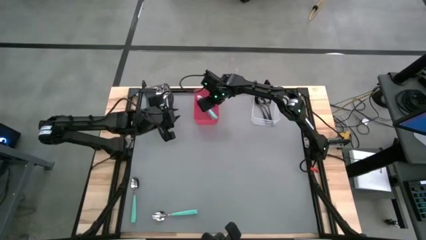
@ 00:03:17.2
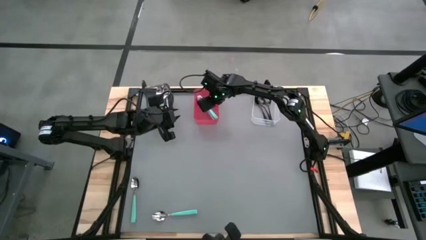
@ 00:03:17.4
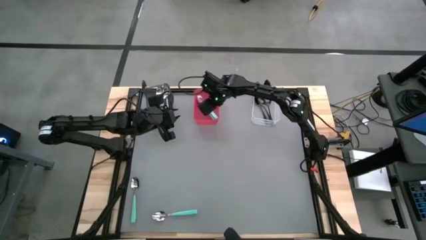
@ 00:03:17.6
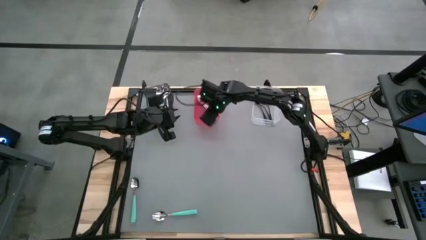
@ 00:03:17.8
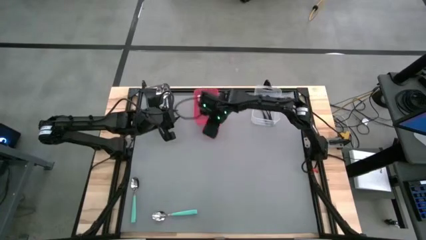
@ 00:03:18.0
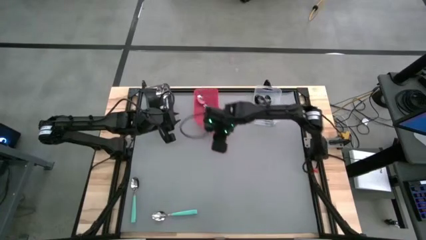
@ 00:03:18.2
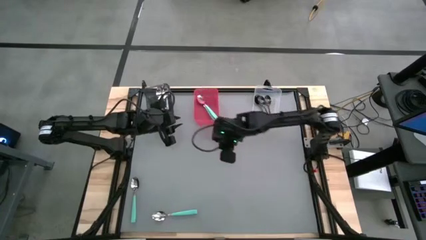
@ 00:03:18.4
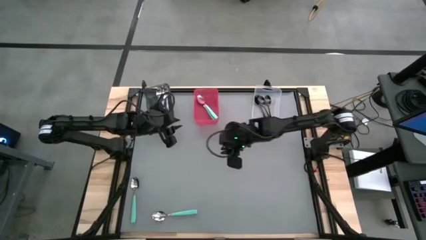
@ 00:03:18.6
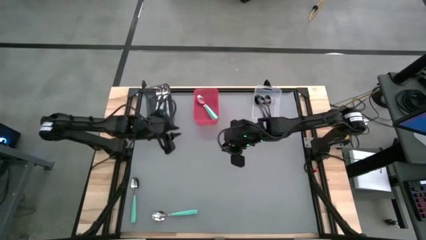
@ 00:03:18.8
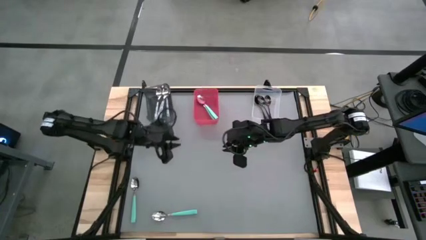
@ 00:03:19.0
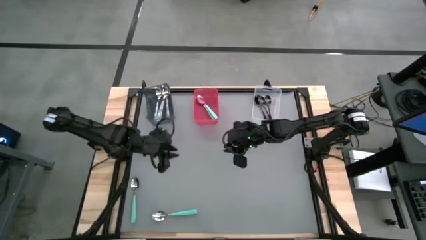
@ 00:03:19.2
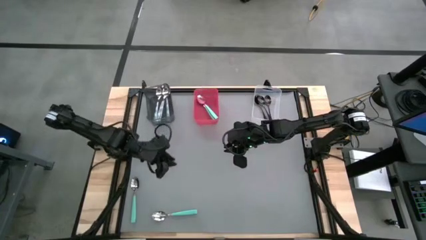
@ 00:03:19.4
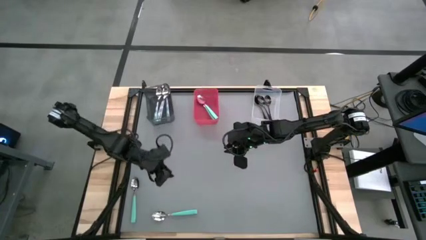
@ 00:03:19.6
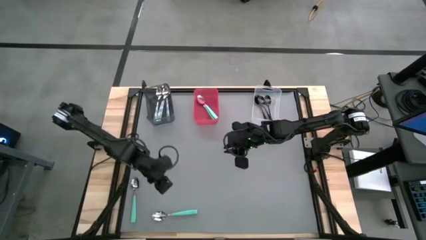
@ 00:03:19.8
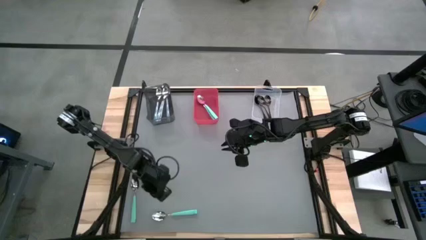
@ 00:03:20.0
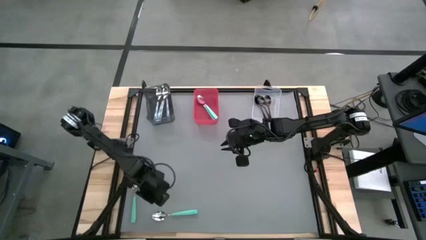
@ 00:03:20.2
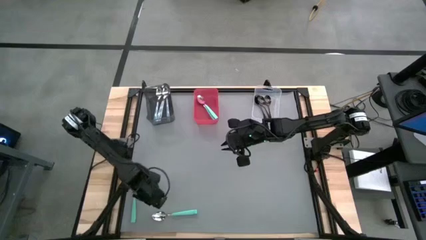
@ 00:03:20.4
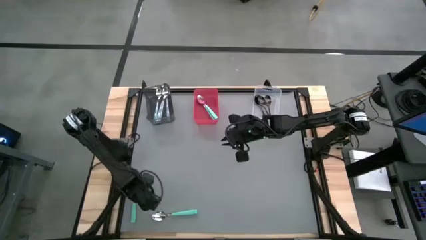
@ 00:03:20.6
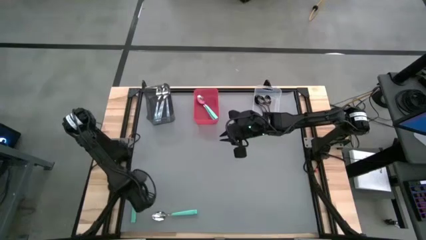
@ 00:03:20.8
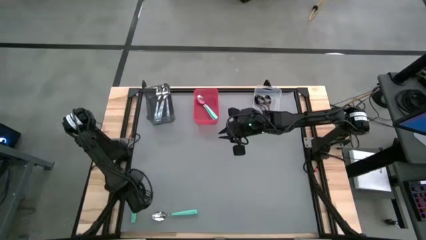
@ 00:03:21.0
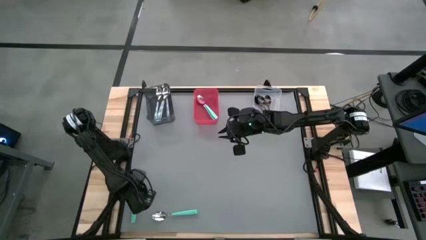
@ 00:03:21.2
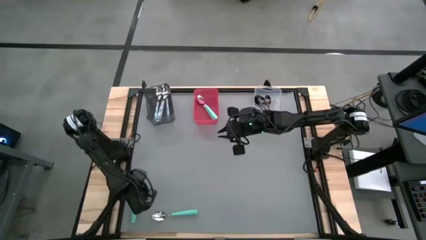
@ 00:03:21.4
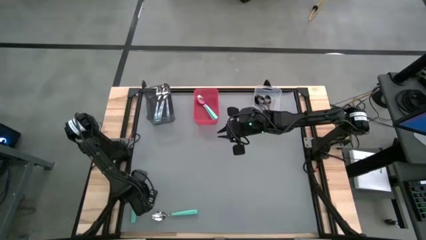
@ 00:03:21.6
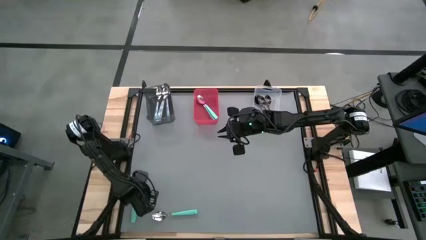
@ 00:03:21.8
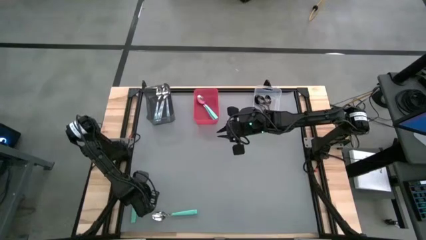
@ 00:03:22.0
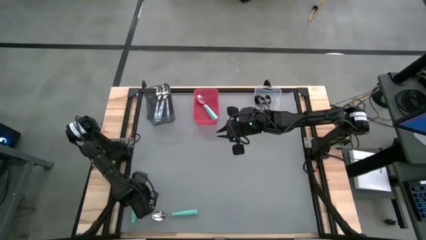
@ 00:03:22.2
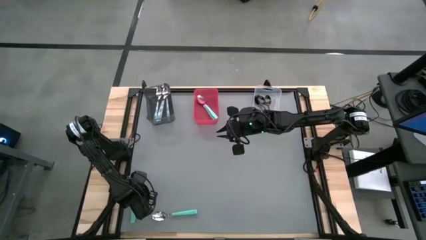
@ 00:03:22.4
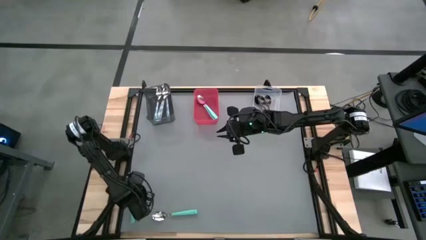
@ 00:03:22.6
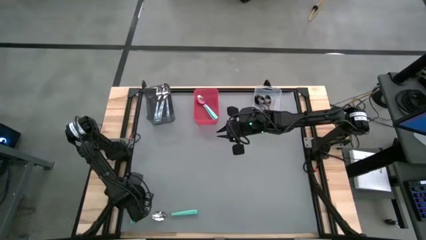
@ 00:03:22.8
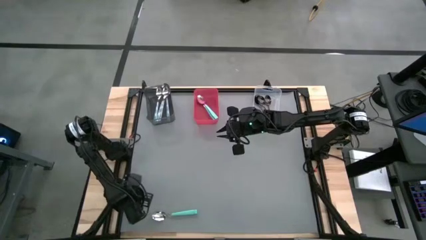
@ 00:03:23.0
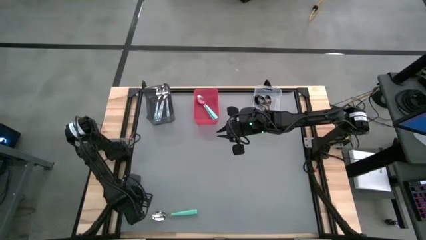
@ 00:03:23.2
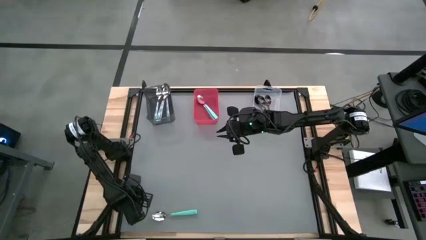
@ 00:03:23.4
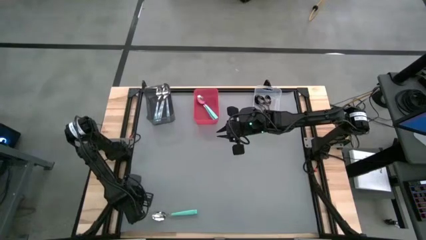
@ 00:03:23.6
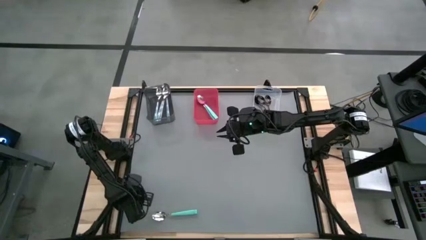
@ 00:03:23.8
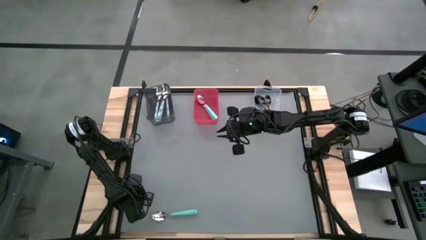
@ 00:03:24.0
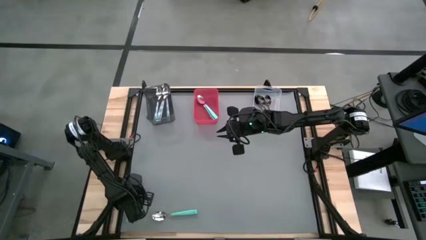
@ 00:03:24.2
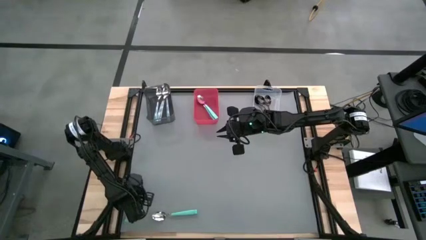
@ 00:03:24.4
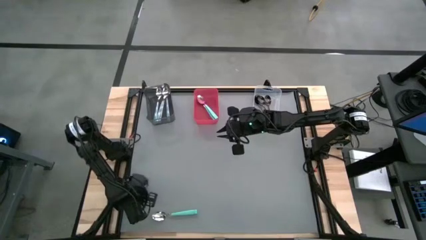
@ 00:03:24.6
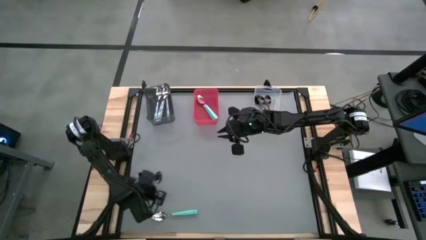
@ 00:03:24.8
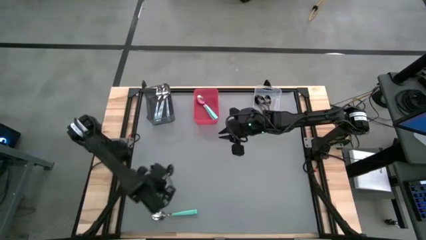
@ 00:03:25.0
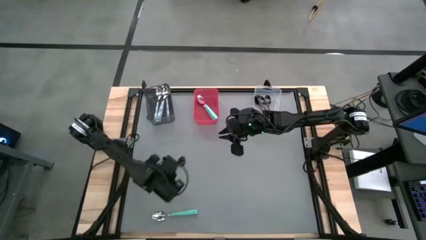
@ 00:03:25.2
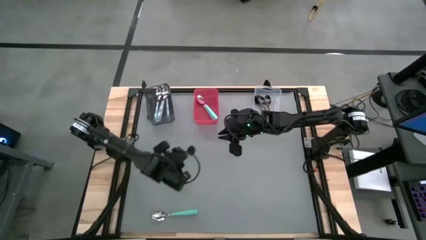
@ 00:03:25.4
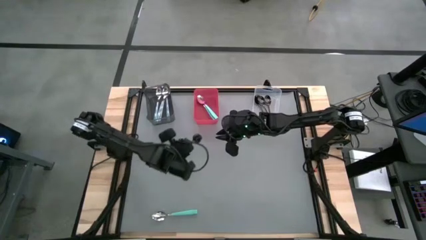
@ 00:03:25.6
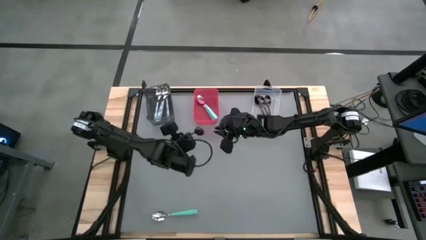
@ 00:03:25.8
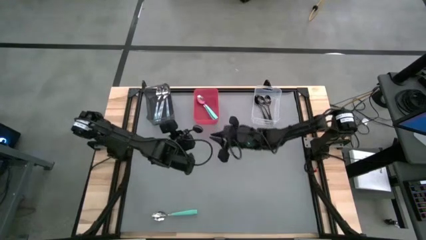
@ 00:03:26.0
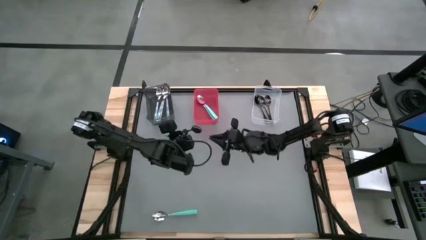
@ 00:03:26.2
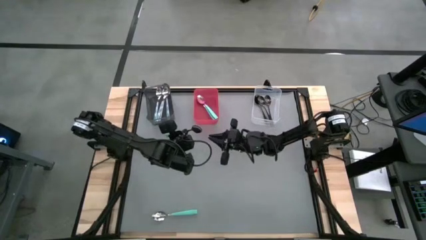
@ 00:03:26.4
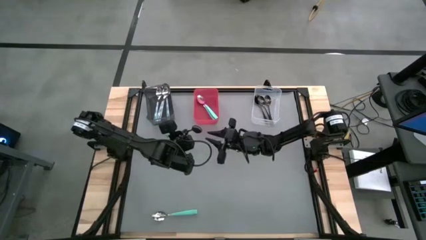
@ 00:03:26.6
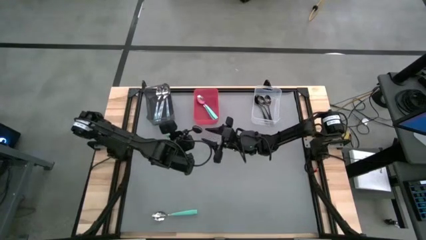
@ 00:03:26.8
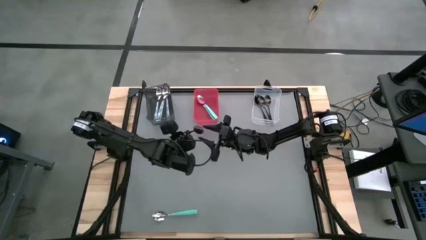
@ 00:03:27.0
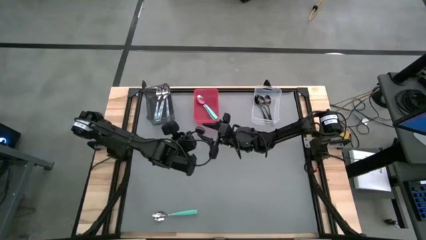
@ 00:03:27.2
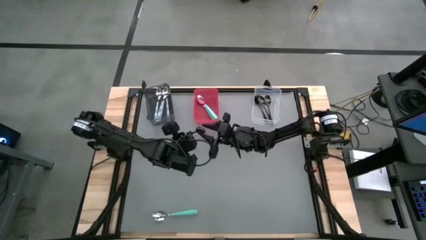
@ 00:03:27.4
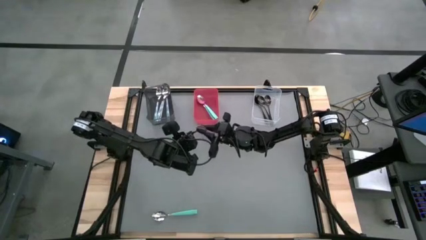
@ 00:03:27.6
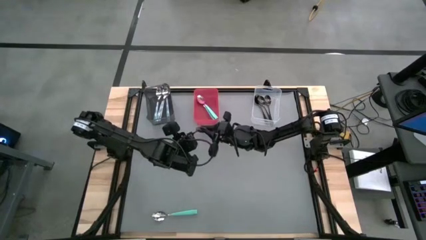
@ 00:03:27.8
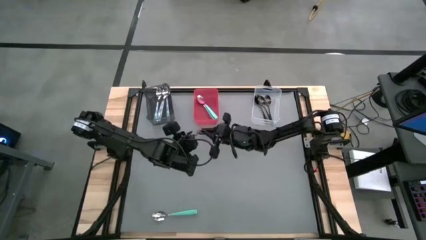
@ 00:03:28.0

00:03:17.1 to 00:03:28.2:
Task: Sort silverware by color (type)
Put the blue spoon into the red bin

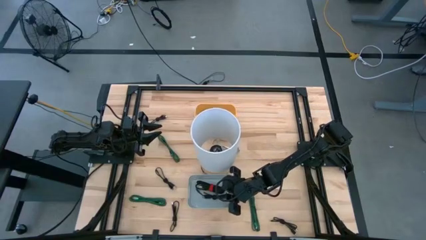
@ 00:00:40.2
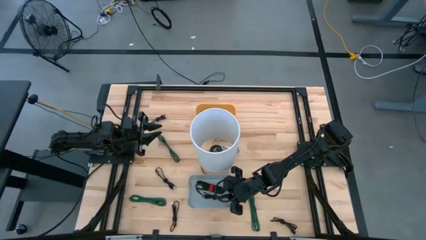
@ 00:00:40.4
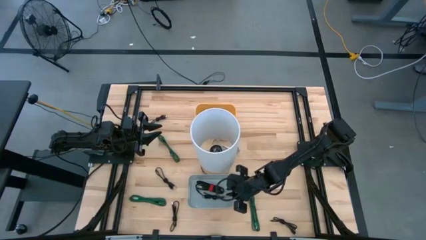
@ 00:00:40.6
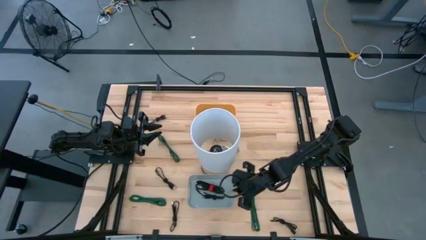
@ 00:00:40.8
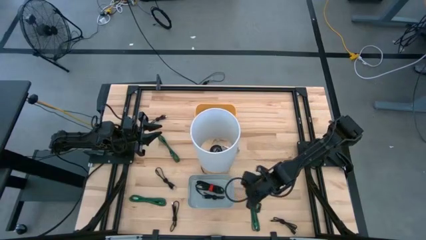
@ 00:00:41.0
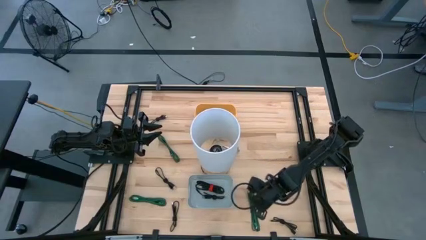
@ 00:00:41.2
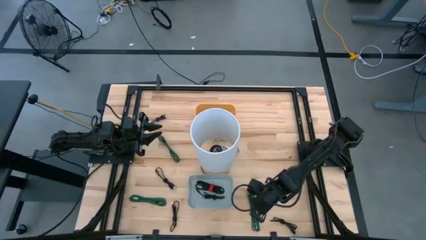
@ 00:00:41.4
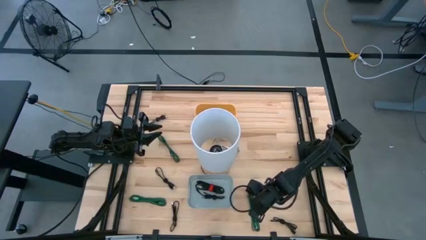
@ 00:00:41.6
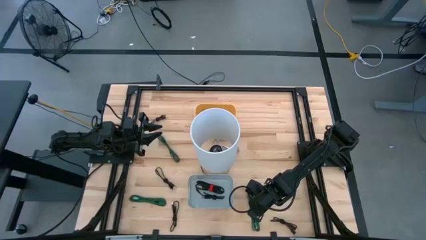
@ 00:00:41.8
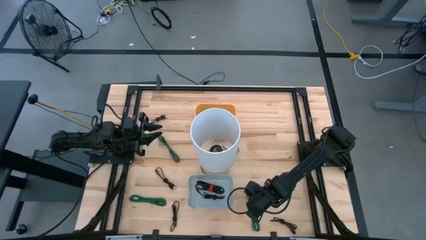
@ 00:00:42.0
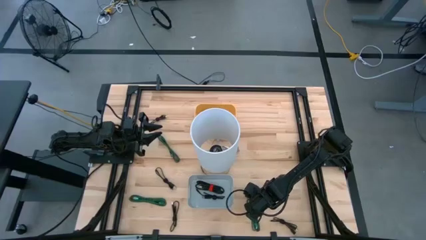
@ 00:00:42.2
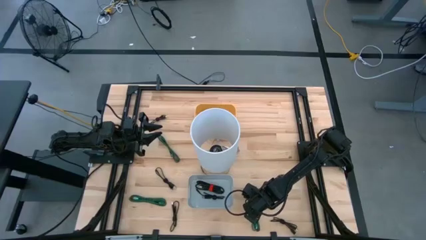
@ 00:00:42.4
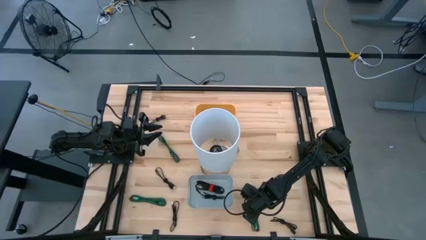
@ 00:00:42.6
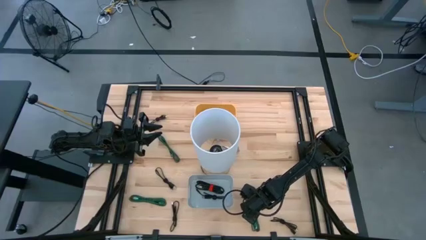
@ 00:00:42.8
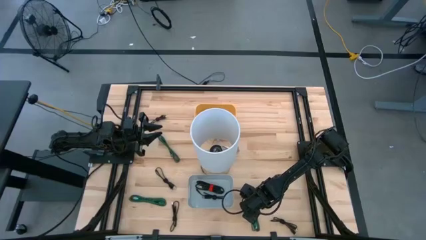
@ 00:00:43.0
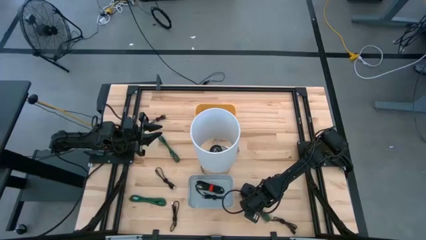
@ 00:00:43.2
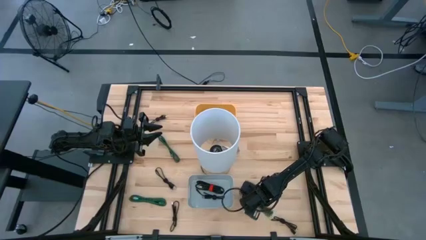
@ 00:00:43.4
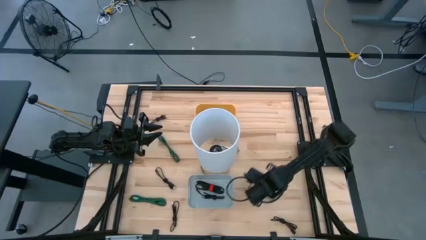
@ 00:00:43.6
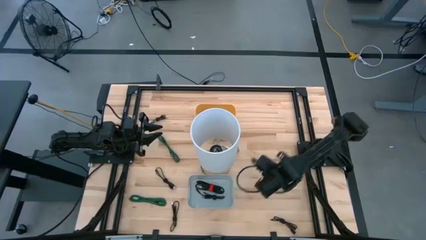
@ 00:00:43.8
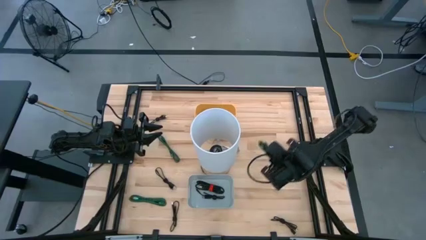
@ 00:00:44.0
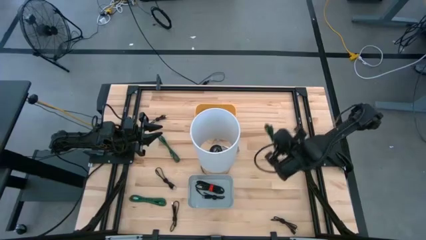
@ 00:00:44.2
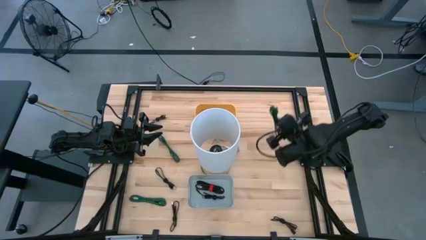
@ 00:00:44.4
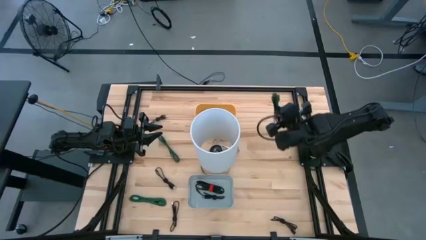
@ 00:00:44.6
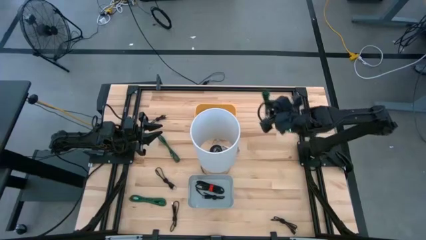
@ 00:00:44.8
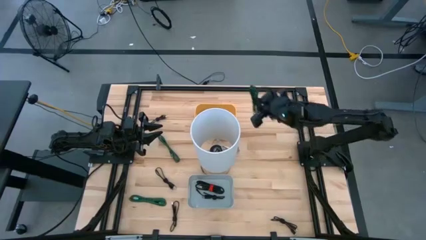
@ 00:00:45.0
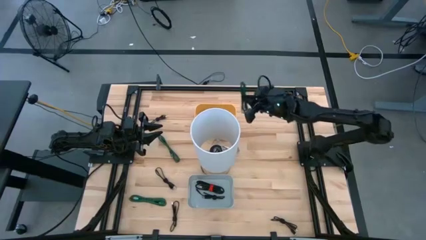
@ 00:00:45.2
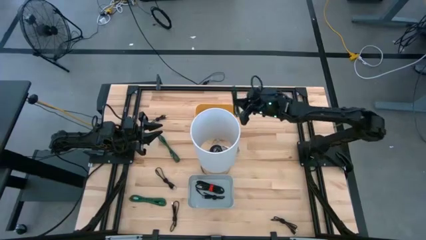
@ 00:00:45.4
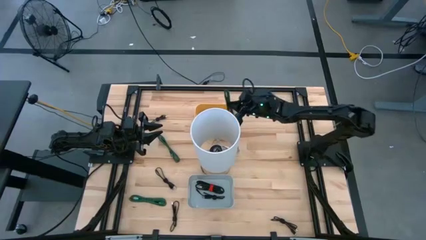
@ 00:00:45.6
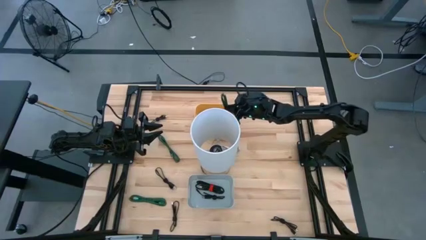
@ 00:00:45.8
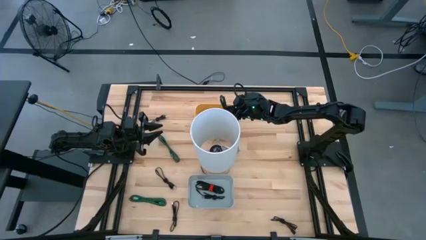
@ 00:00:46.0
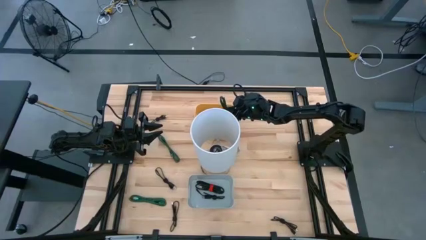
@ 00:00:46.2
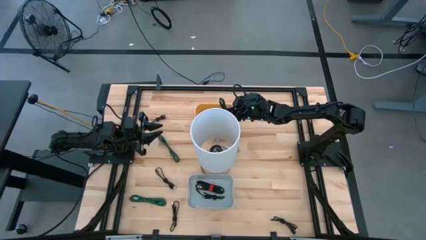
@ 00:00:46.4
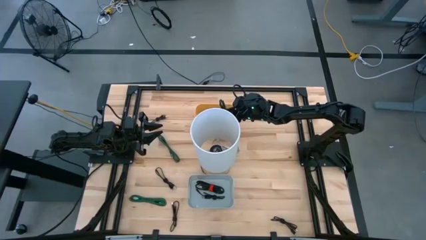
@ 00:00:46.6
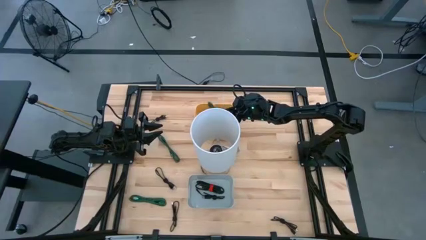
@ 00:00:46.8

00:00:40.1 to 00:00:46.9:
Task: Pick & Place USB Port
Put the green charger cable into the yellow bin
